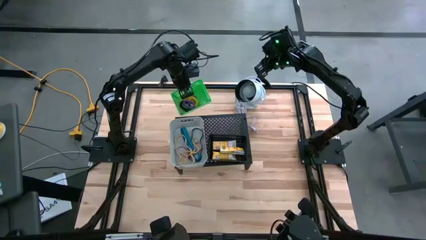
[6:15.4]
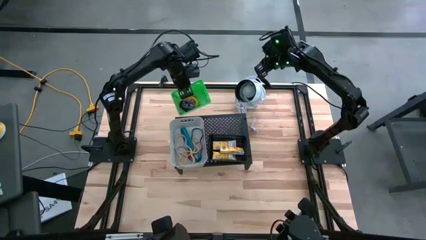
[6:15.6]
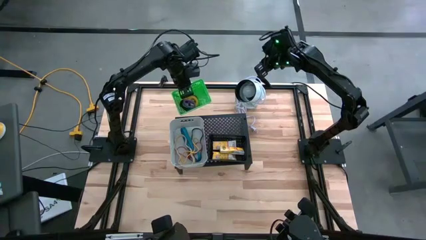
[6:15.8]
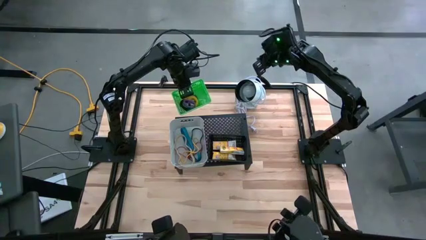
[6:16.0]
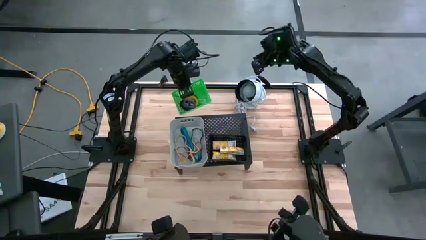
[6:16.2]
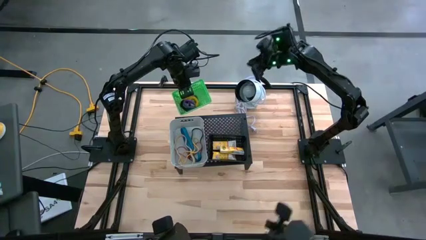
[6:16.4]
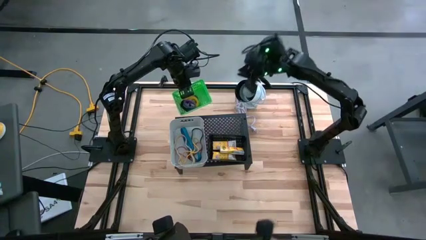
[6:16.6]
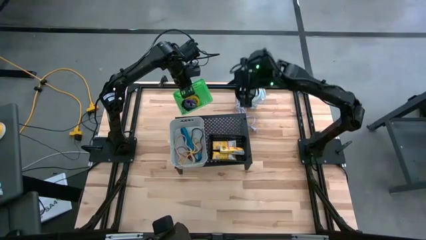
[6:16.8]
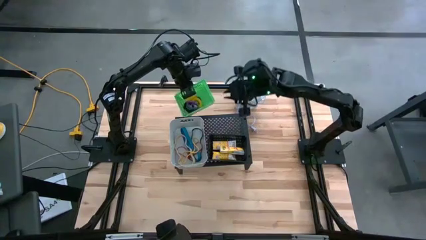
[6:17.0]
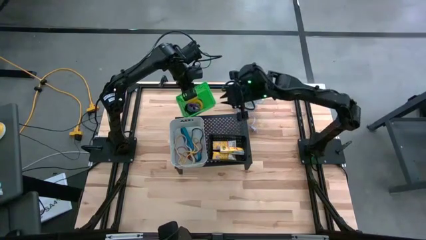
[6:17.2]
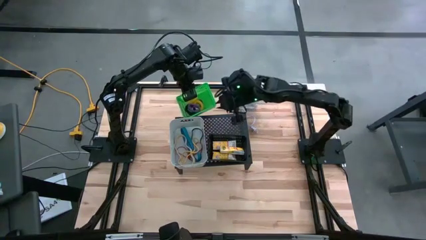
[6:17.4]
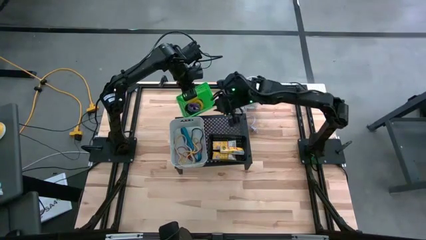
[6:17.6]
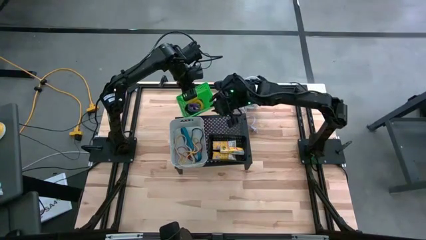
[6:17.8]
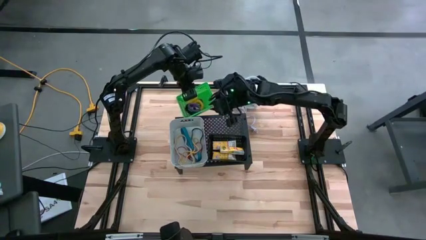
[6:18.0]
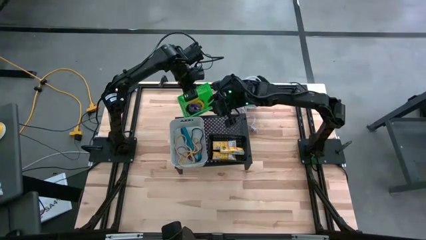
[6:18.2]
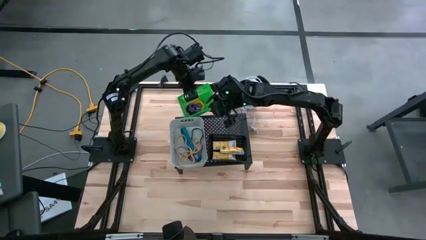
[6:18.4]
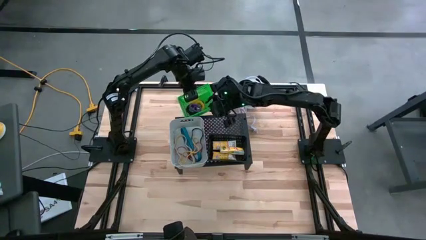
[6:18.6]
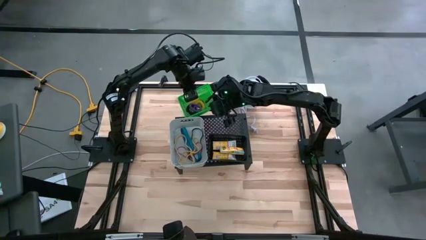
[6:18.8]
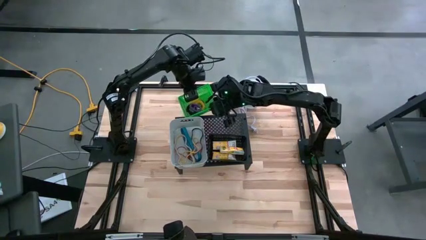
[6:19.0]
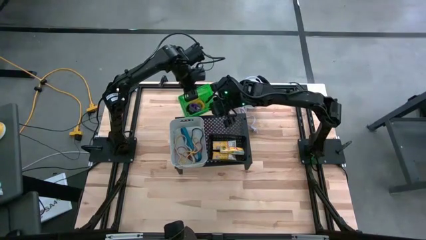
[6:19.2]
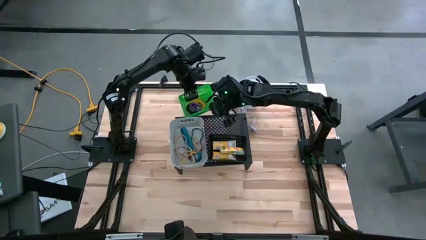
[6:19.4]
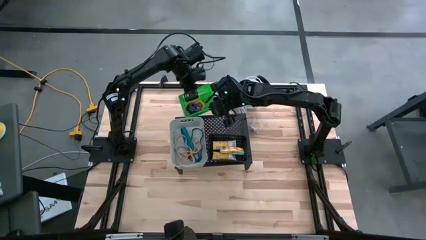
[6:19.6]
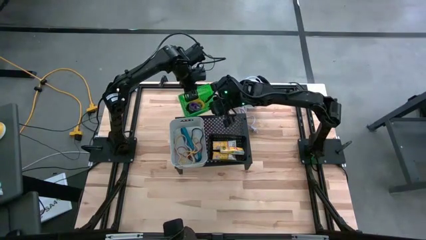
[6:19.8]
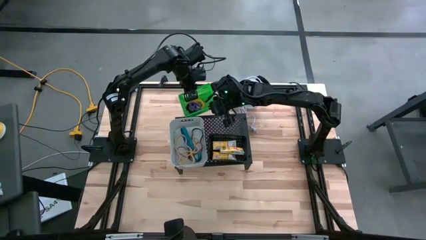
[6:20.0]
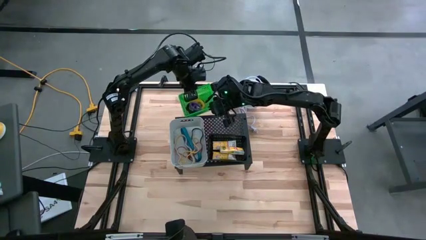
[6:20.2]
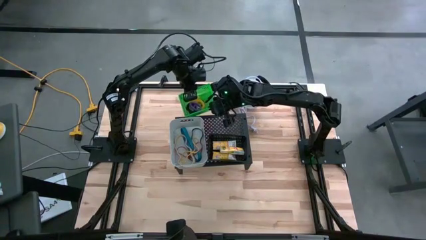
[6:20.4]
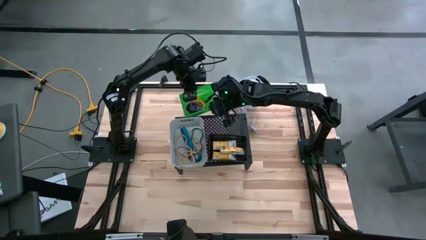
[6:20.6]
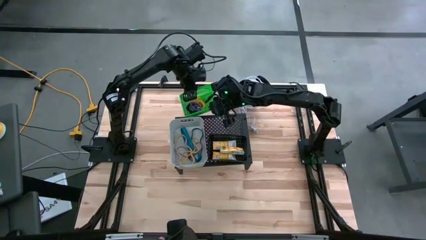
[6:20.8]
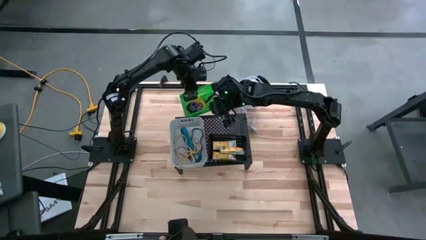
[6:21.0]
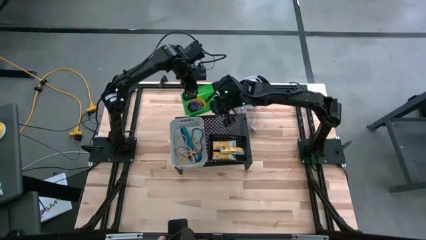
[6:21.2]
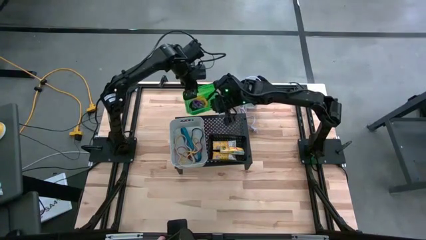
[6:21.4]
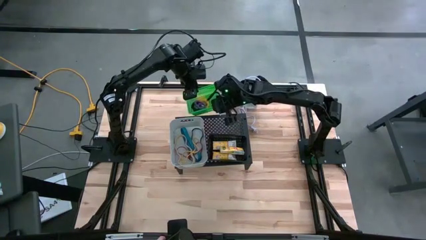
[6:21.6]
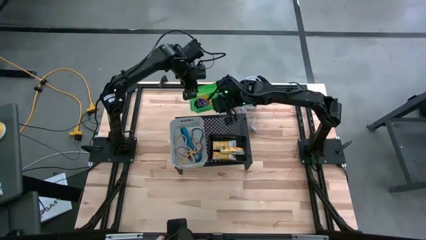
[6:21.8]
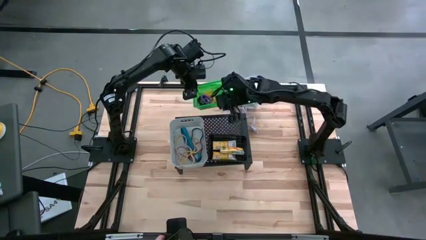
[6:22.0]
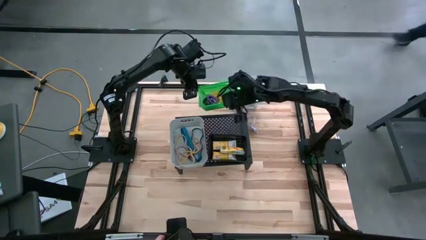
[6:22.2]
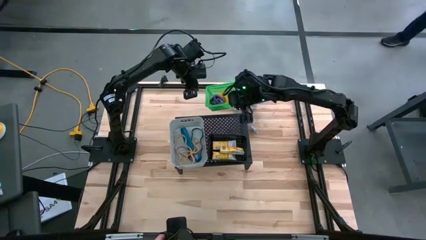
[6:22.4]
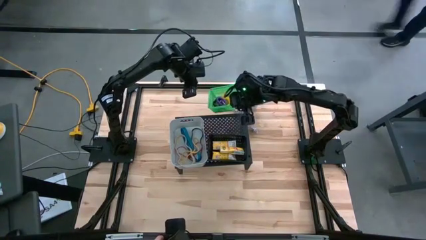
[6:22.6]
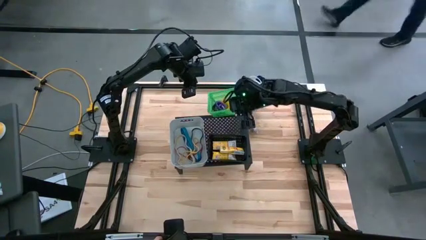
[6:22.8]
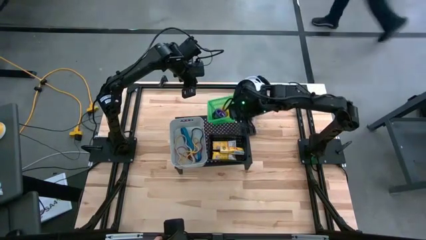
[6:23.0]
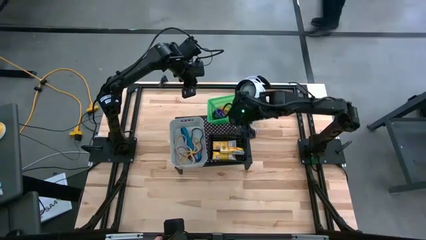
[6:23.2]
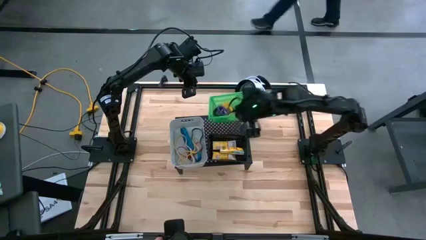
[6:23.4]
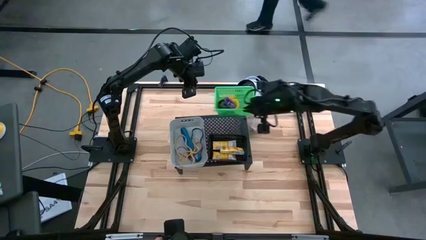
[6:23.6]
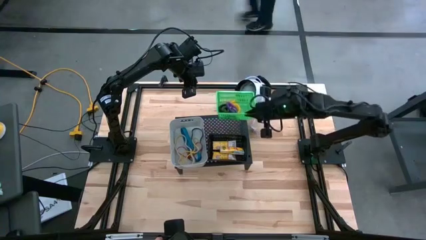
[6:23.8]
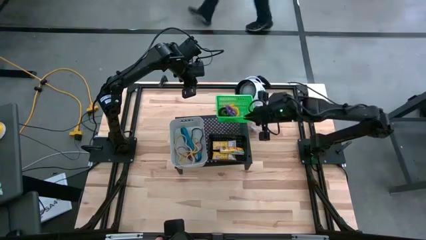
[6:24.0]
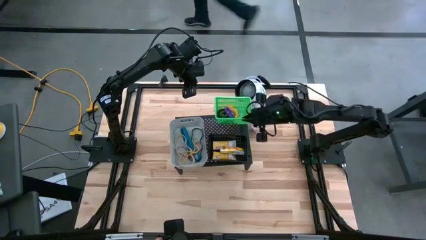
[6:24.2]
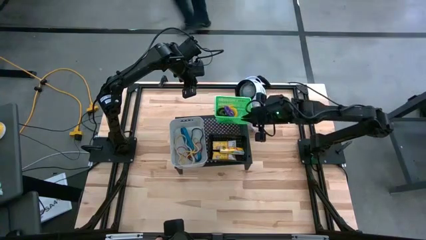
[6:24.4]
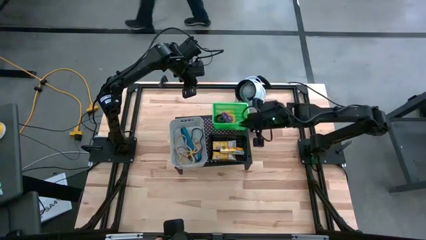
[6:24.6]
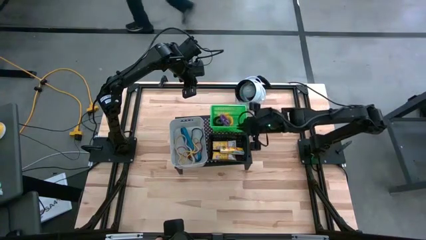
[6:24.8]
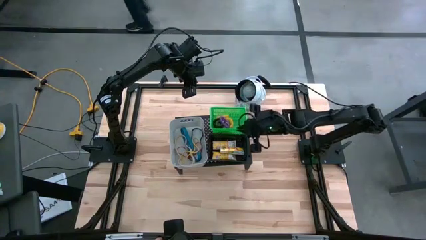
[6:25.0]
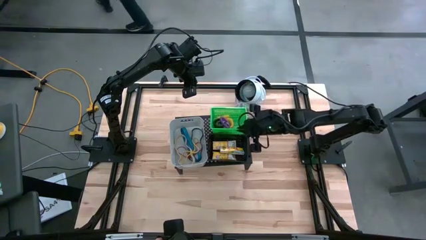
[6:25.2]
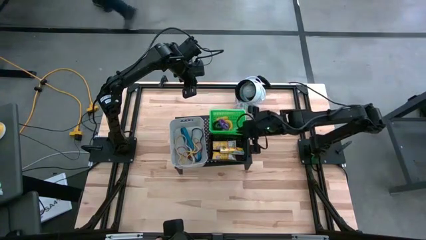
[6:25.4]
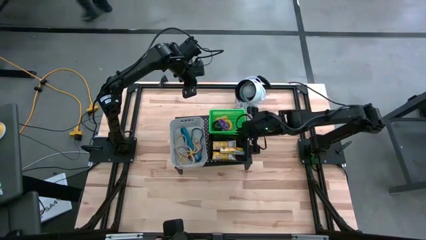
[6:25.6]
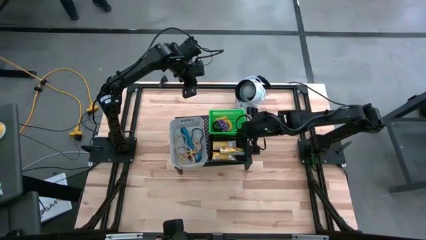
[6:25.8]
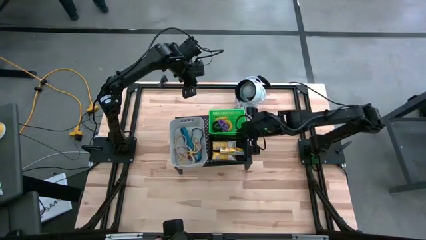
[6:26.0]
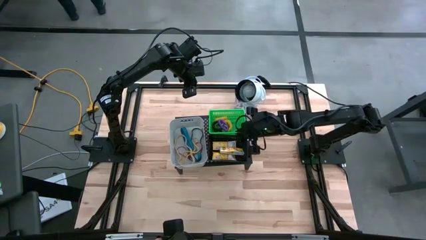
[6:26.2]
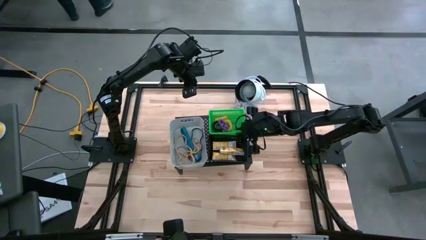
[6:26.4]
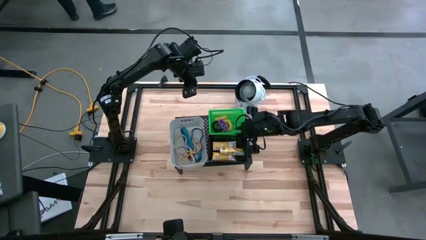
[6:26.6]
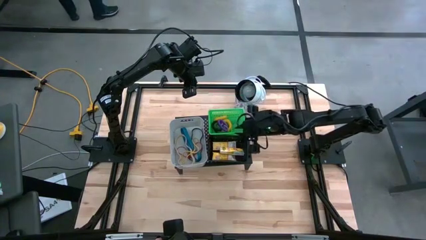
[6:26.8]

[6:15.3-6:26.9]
Task: Pick & Place Office Desk Supplies
Put the green bin with the spring keychain on the shelf

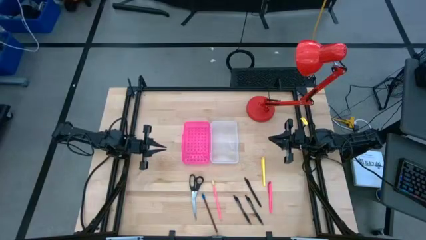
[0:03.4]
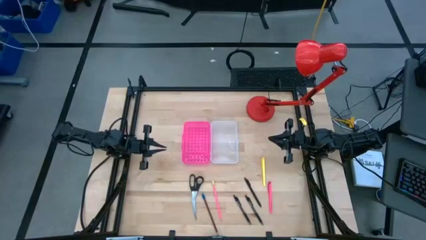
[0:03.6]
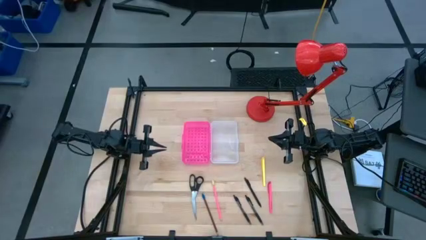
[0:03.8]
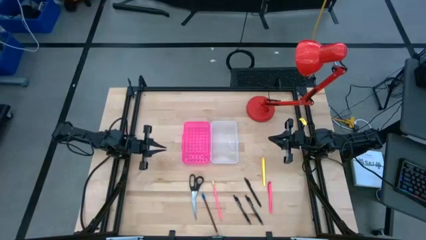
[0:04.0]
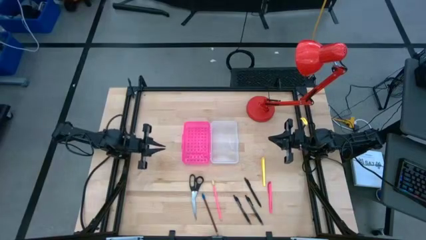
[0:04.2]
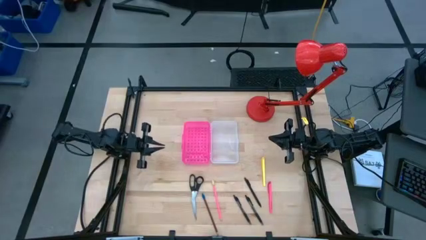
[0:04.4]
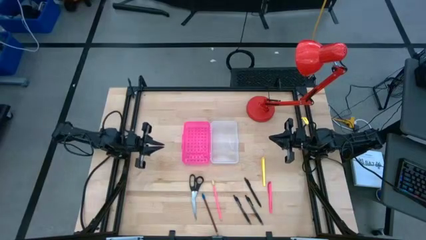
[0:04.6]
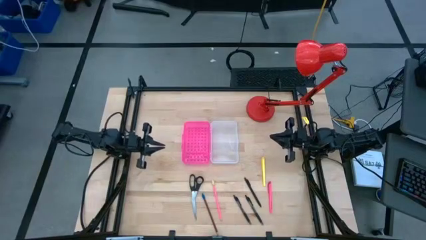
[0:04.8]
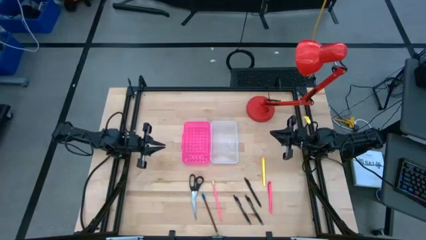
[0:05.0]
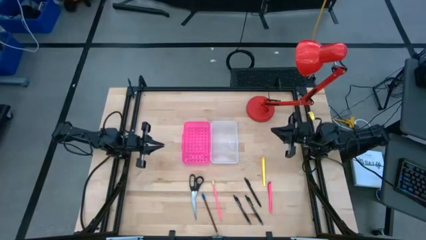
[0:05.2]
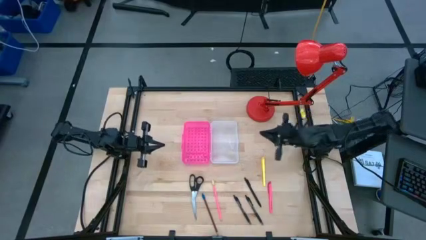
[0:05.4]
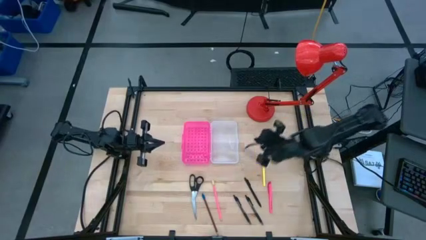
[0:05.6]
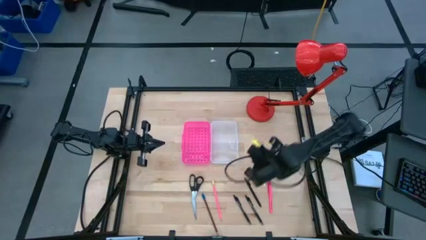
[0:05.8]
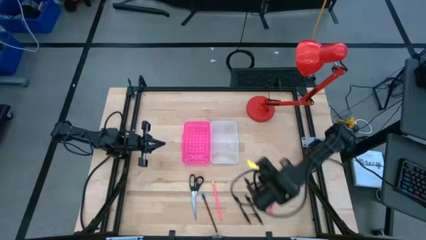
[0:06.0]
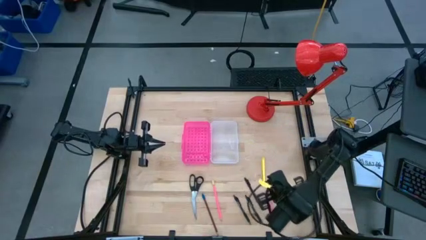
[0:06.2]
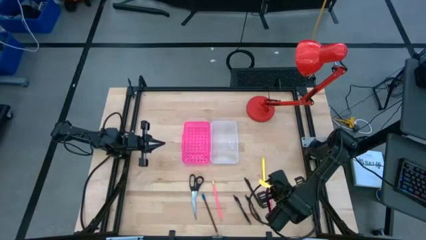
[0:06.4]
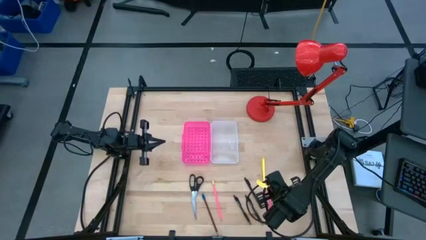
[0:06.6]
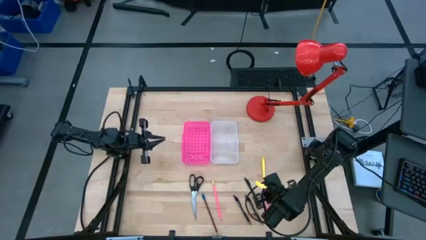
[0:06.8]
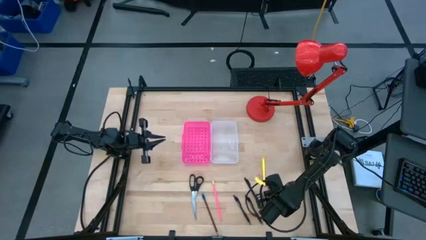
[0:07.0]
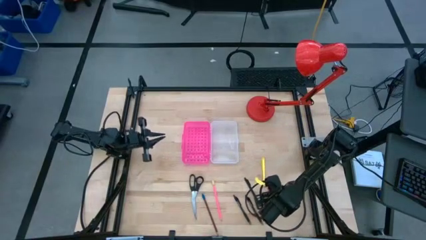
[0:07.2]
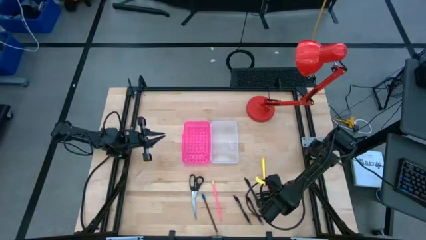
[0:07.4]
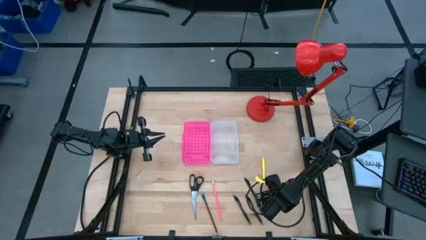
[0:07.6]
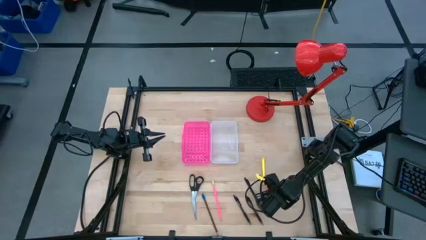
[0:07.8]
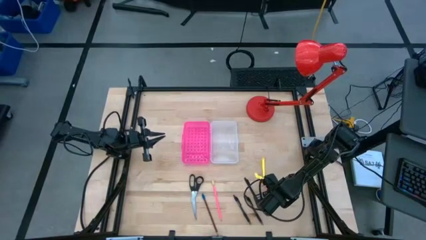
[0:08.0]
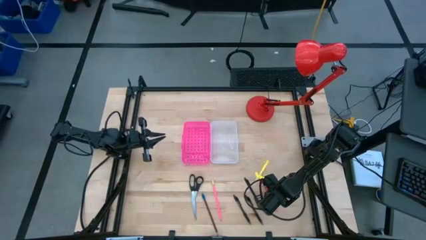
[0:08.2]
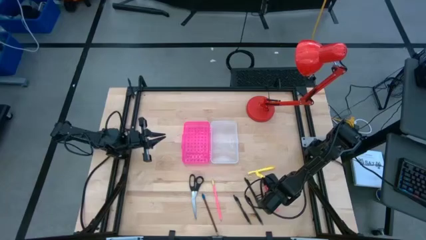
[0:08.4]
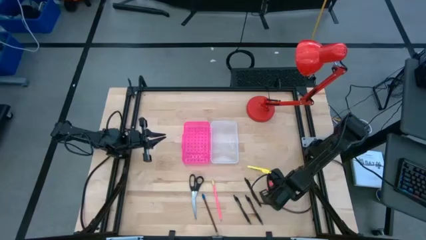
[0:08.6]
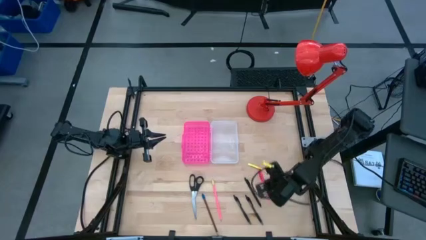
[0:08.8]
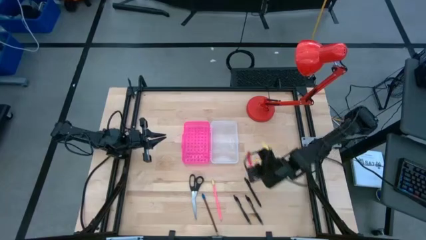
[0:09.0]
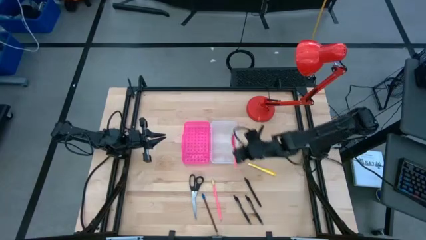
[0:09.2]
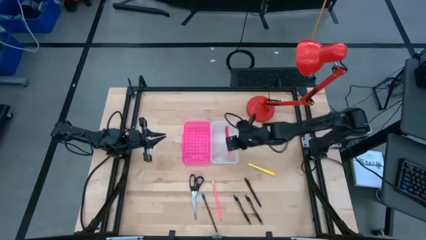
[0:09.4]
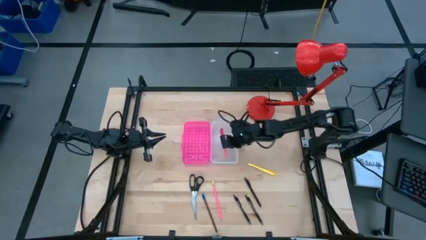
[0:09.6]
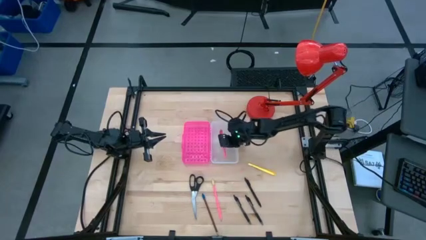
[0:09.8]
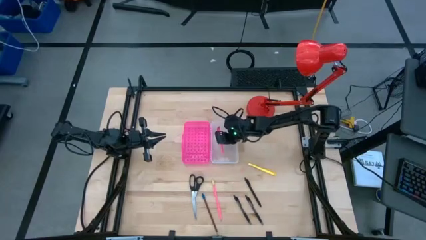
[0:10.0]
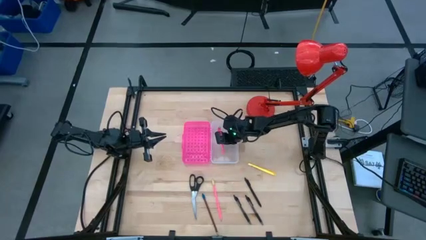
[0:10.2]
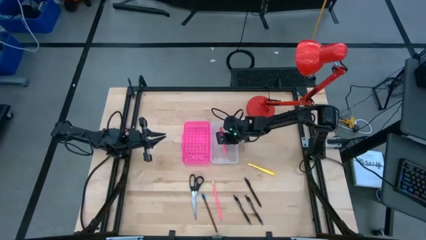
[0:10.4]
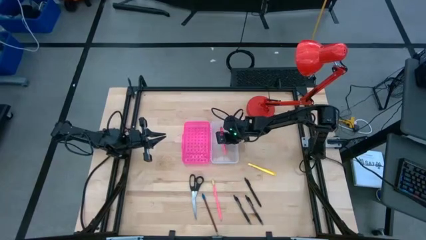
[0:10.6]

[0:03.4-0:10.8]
Task: Pick & place school supplies into a supply box
Put the pink pen into the supply box
